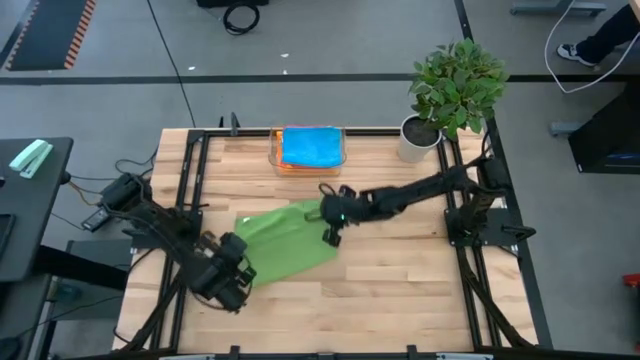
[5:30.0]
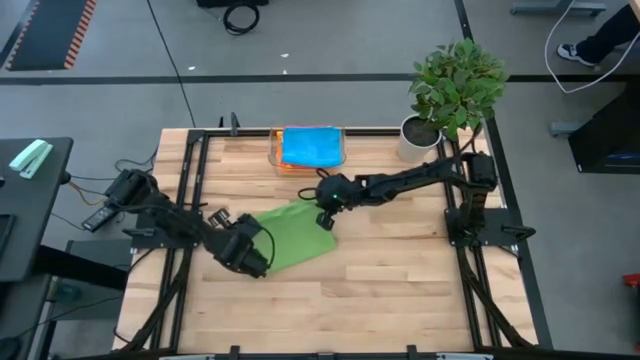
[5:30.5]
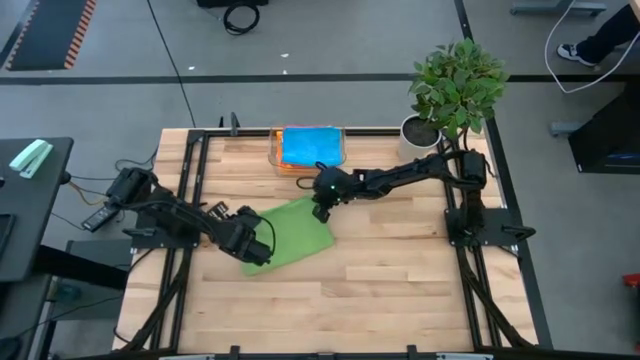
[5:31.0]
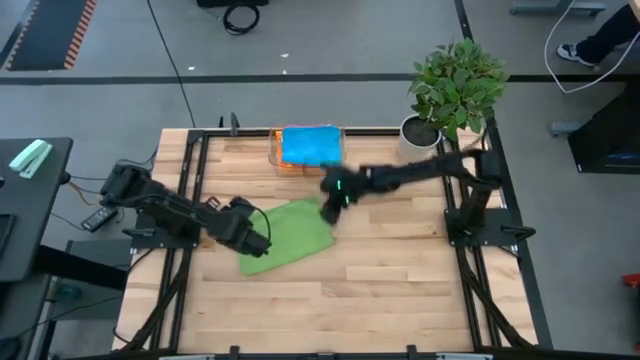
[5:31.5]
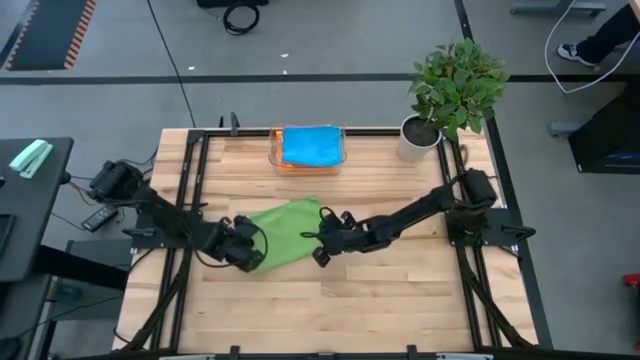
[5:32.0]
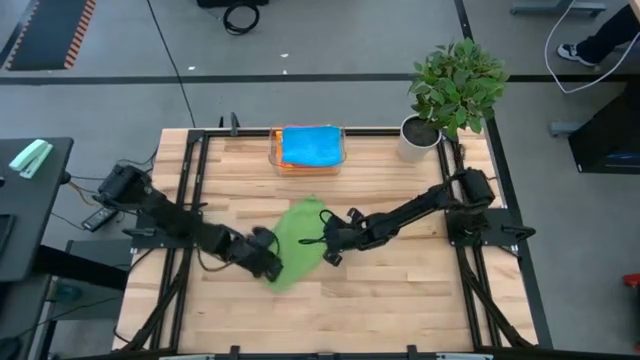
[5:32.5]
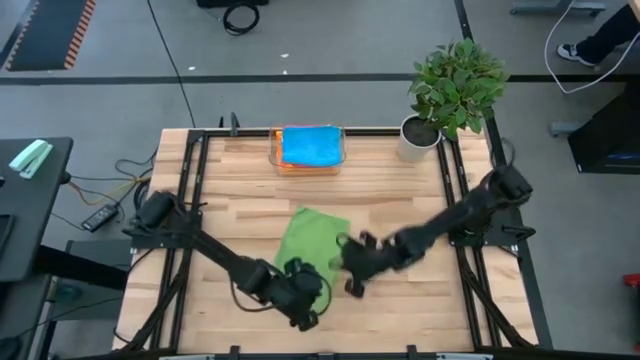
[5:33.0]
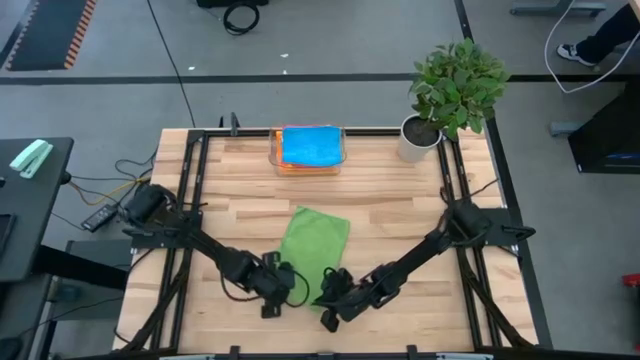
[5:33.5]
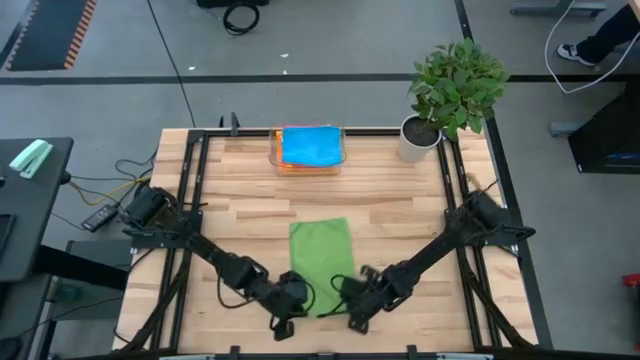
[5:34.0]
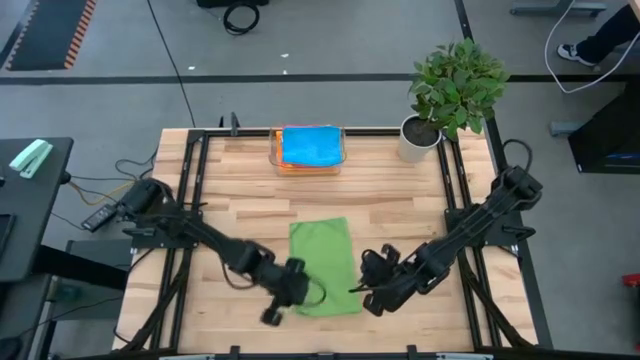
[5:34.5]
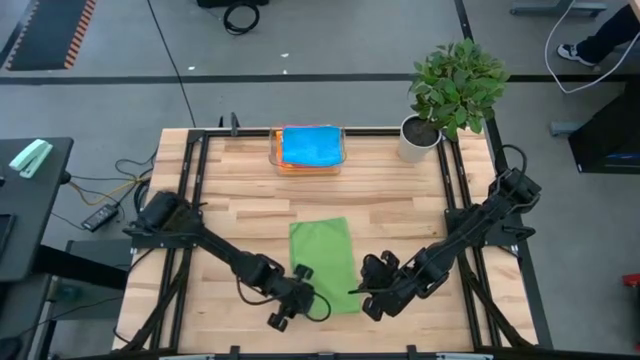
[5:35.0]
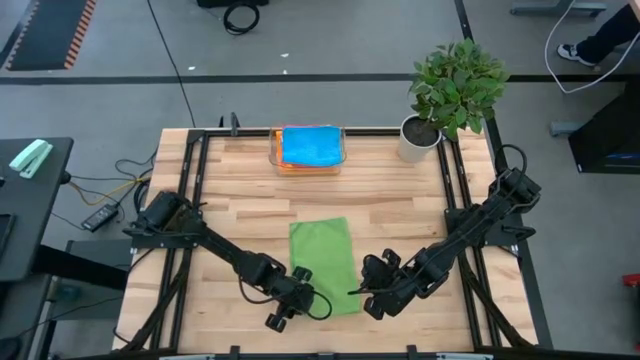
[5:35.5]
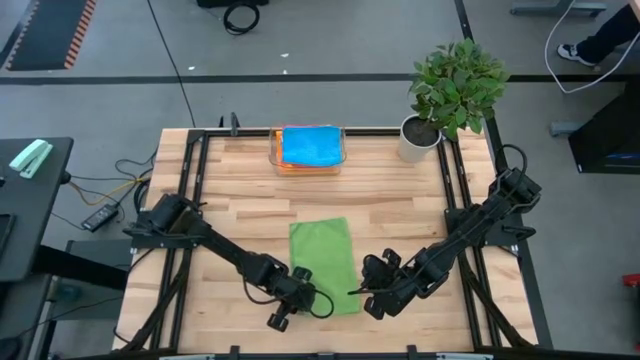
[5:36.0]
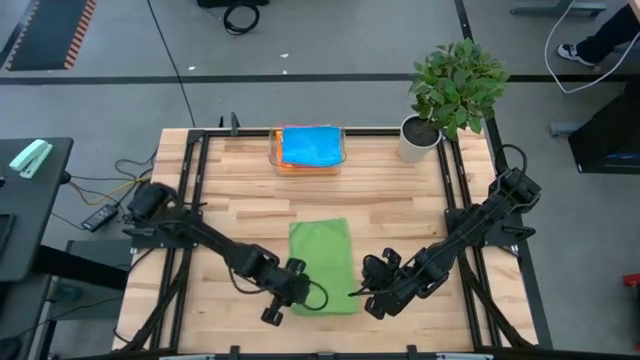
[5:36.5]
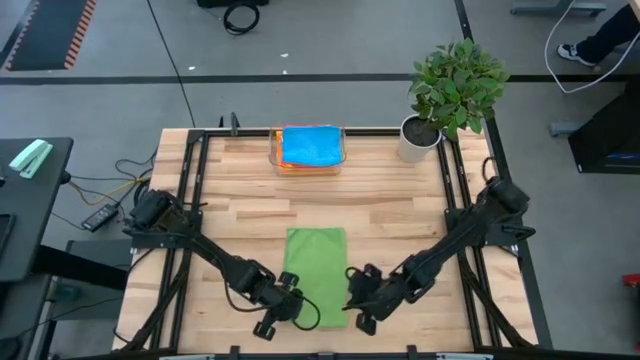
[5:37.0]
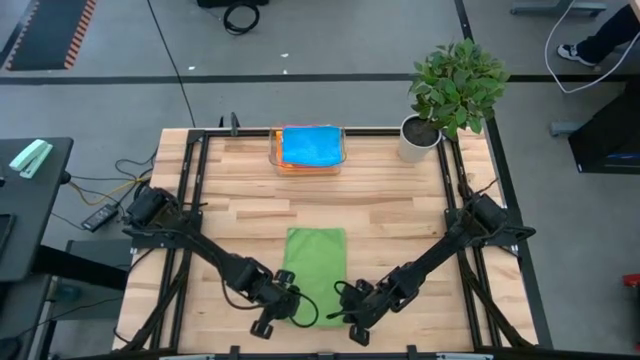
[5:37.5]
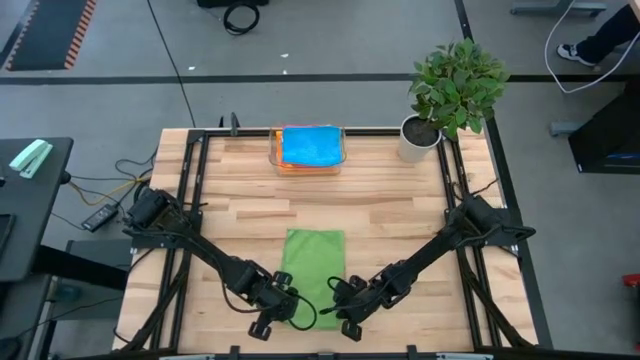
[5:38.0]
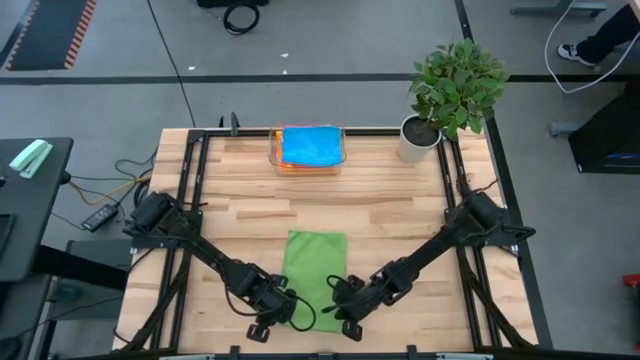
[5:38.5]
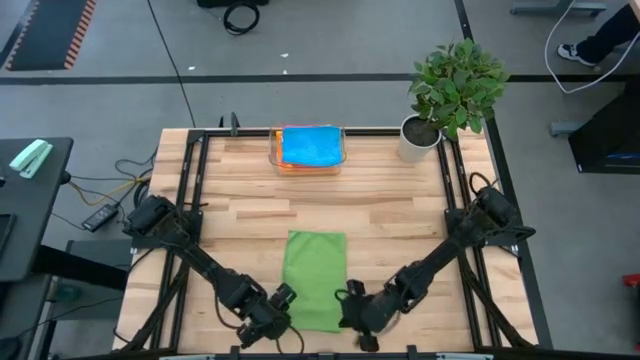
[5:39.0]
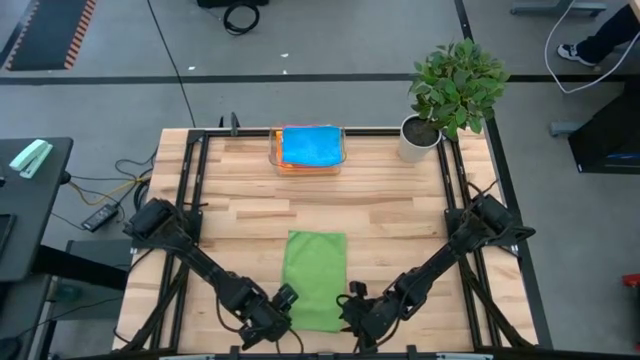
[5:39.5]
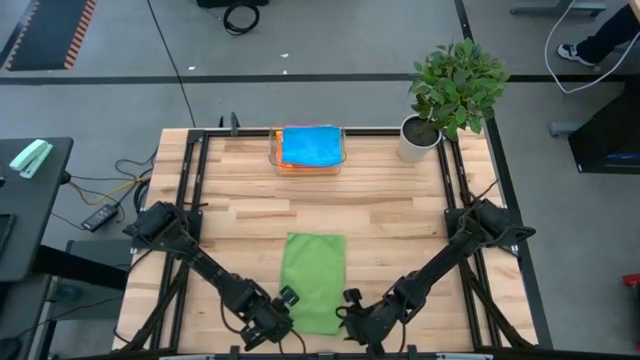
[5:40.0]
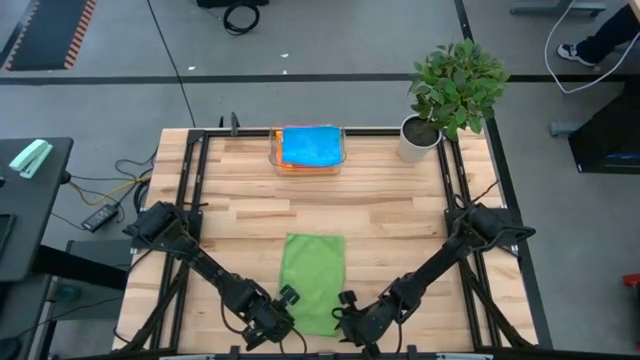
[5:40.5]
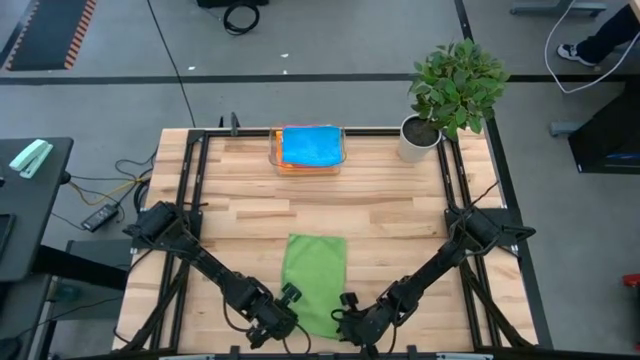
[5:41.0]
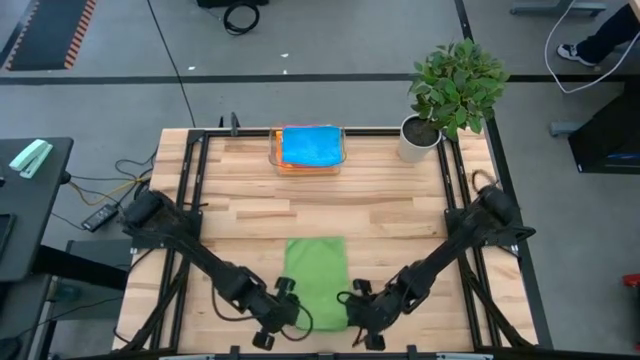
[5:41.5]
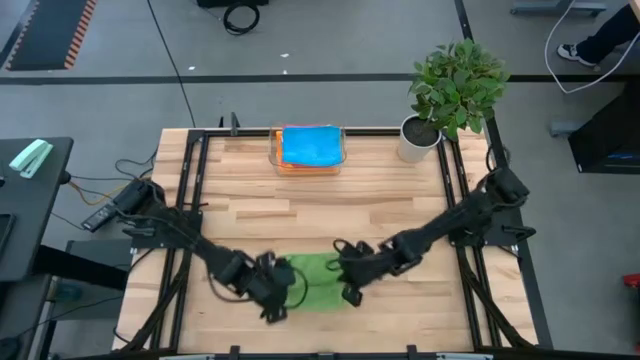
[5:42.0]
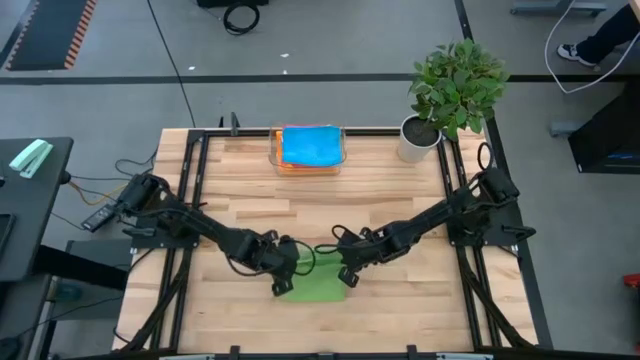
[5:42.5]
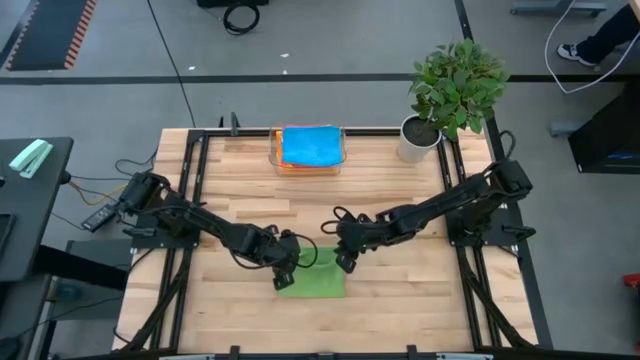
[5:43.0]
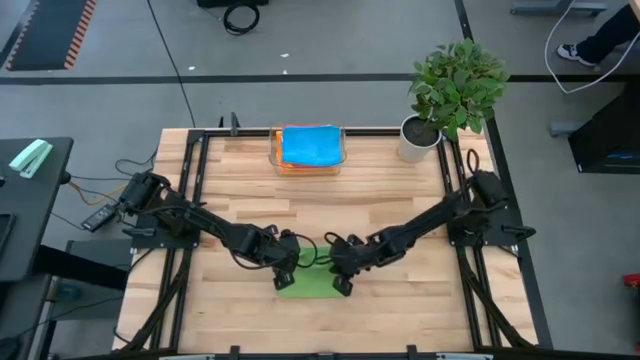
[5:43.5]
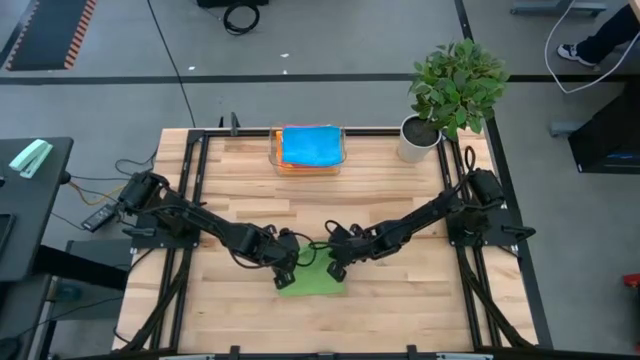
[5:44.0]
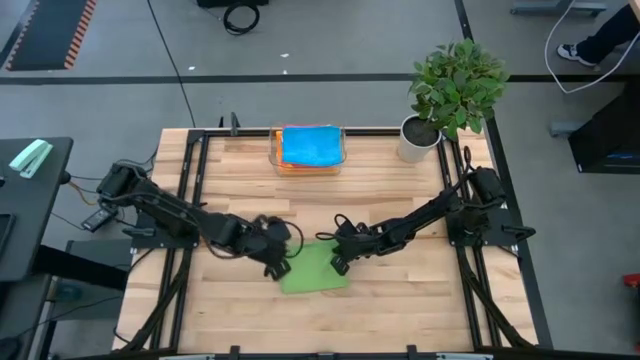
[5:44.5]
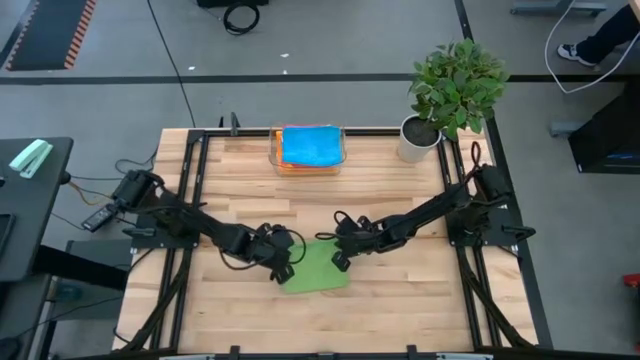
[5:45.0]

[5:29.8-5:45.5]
Task: Fold microfiber towels
Fold the green microfiber towel

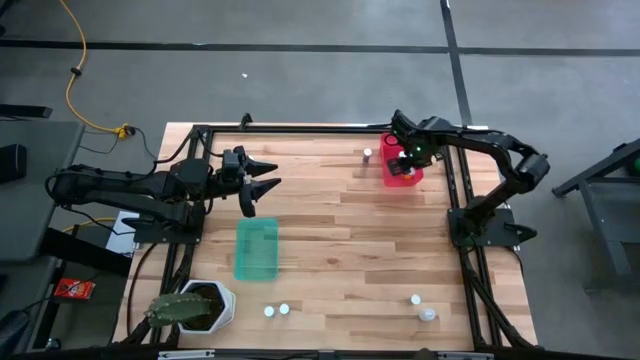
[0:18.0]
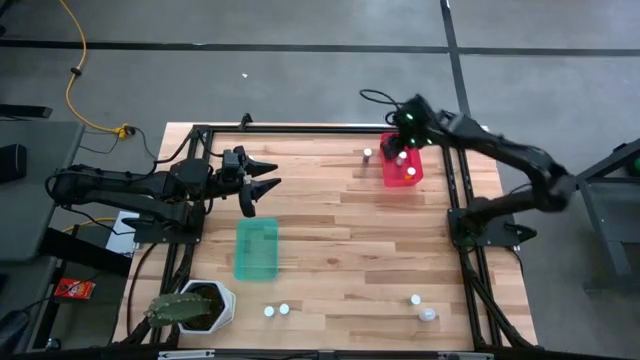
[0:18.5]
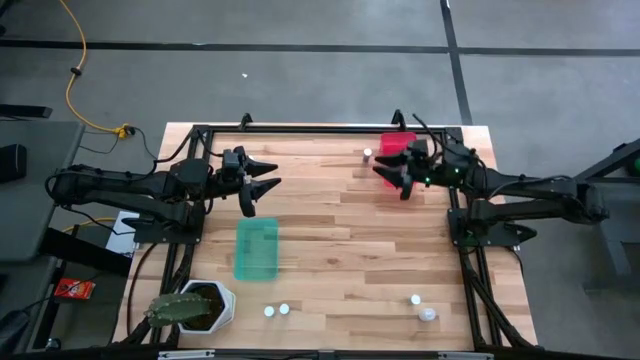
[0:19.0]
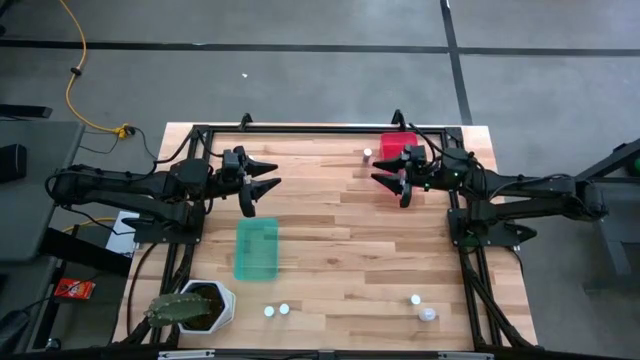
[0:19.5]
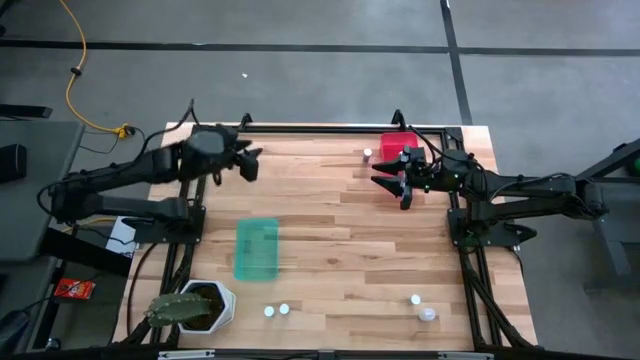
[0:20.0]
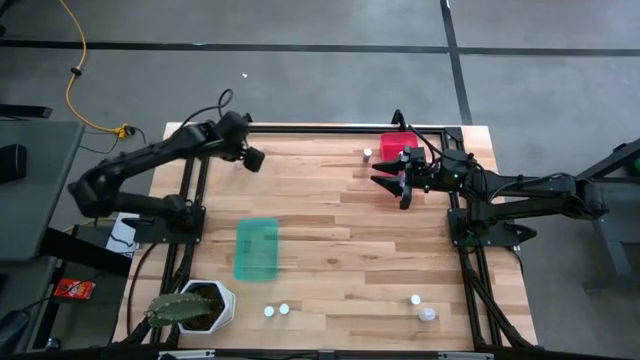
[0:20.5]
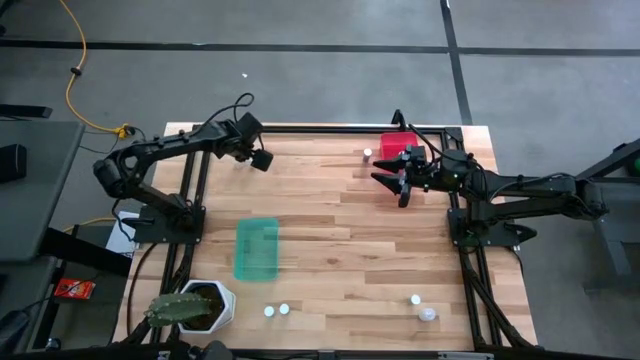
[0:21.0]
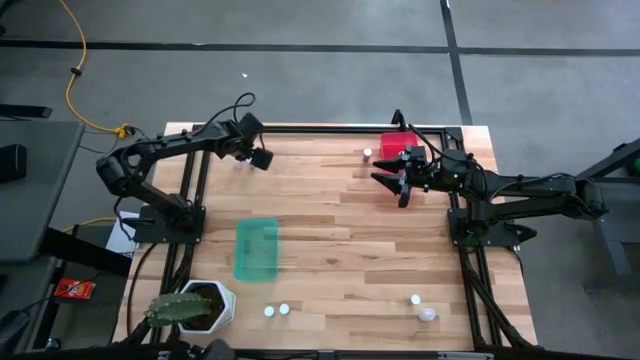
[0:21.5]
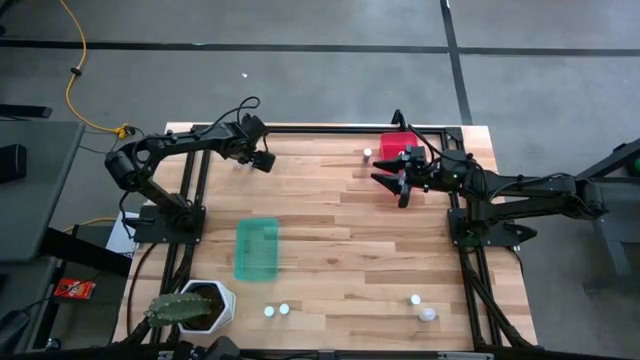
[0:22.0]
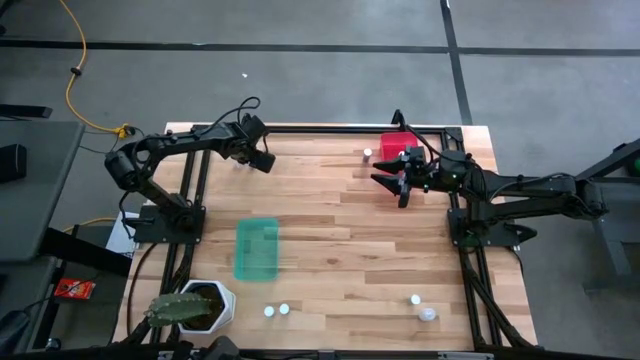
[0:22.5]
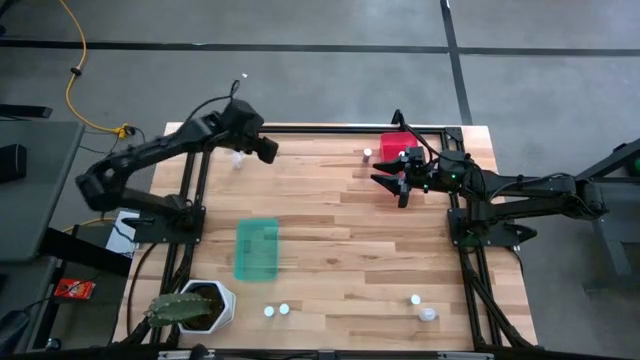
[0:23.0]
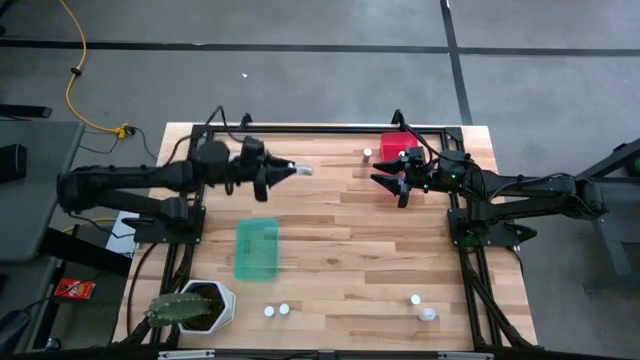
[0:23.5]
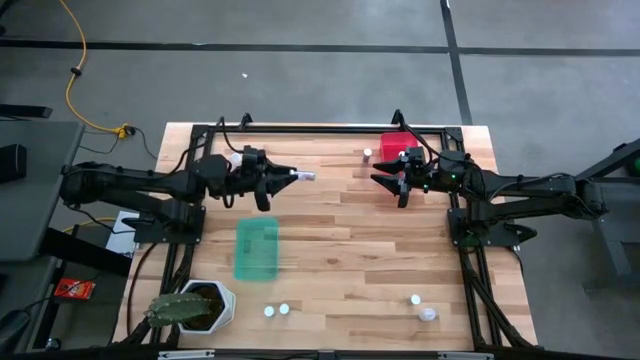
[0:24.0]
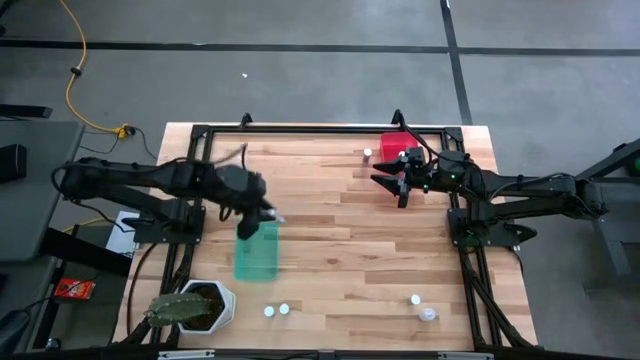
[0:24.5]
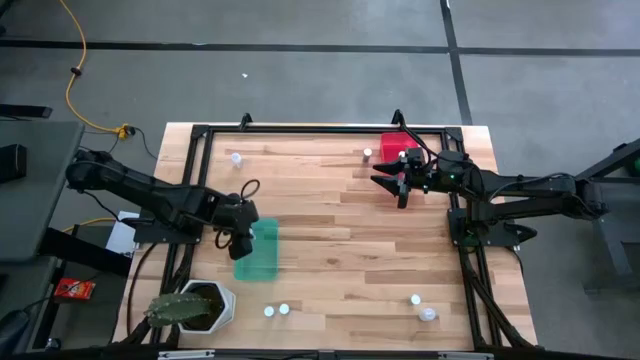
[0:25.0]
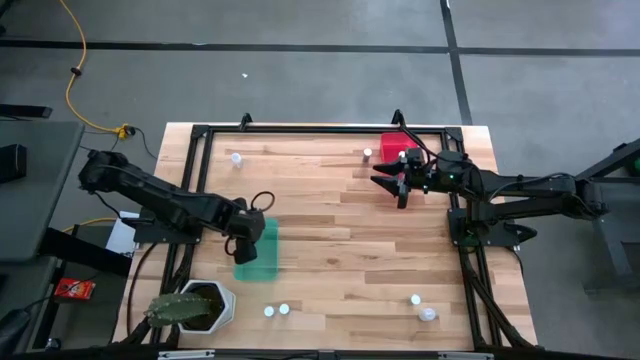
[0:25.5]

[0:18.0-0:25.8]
Task: Pick and place medicine bottles into bin by pill shape (circle, oval)
Put the blue capsule bottle into the blue bin
